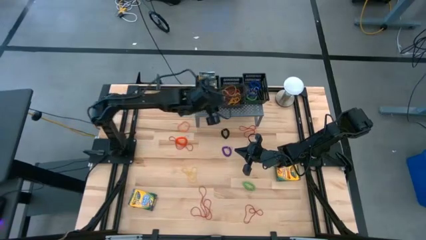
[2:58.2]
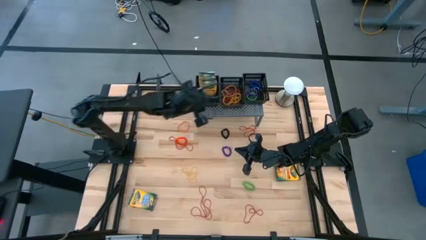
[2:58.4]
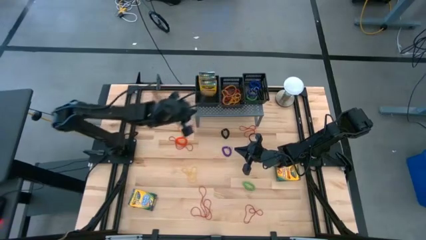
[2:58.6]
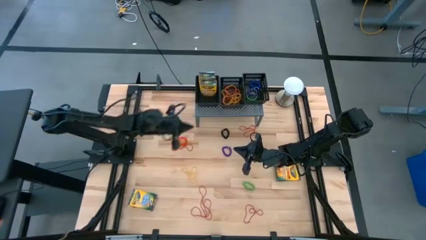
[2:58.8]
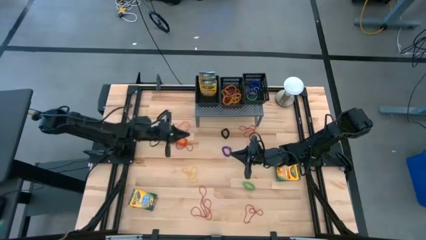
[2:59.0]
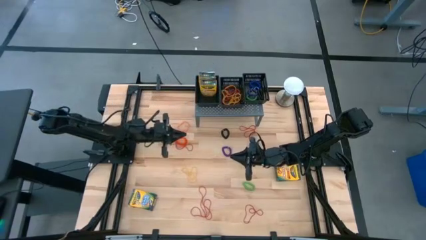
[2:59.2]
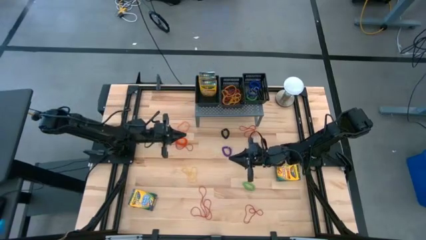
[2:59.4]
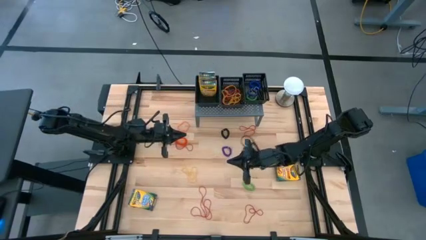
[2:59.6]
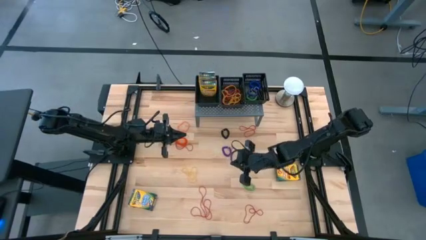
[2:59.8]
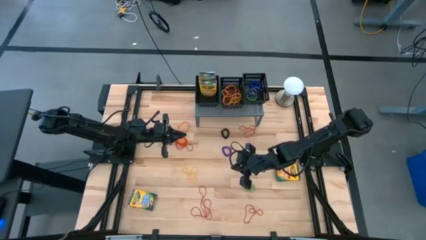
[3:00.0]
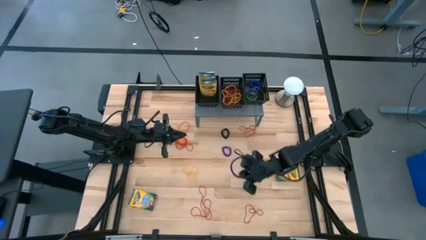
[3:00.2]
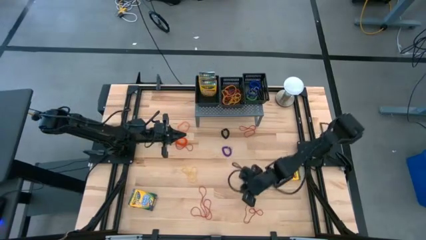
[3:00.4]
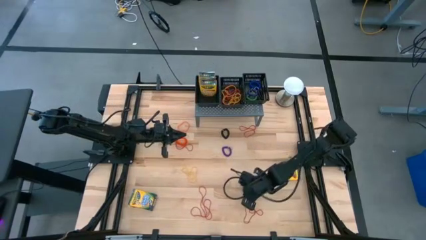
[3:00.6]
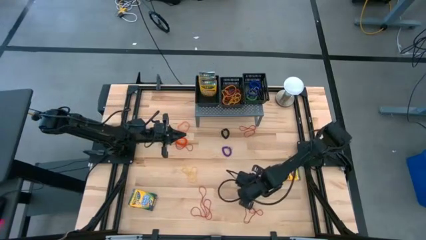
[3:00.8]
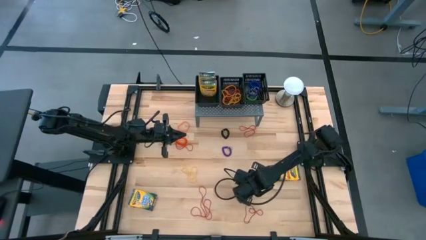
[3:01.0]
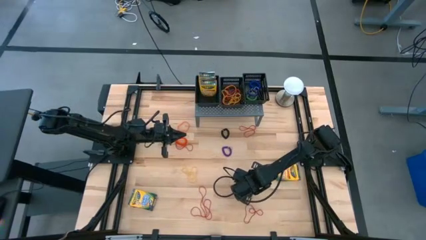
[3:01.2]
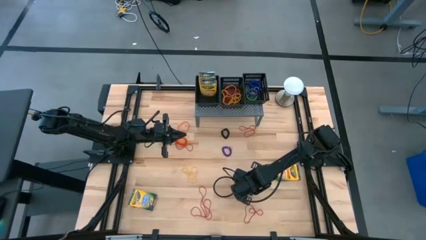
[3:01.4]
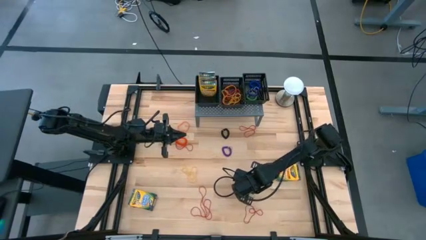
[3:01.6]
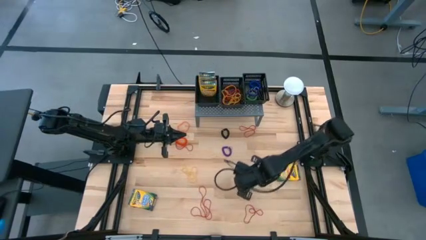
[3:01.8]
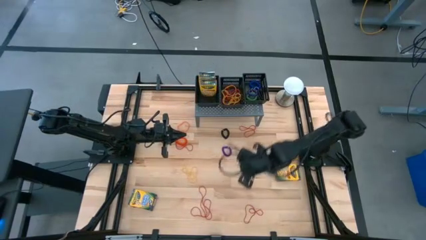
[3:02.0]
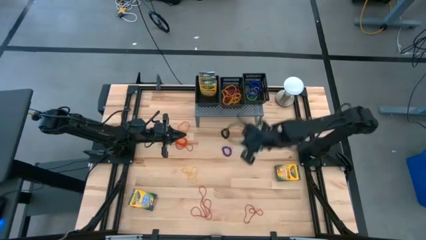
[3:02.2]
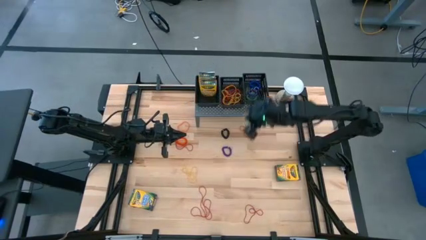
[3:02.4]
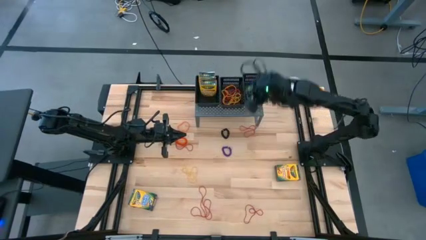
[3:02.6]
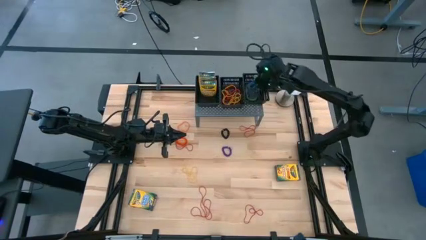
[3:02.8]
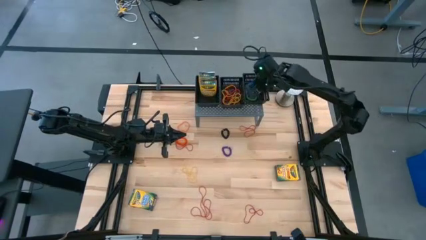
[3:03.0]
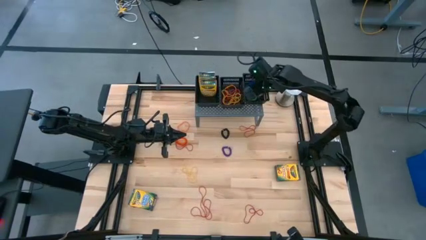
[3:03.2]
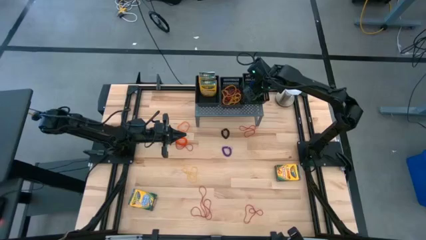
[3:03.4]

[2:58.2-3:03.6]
Task: Sort rubber bands into baskets
Put the green spring rubberband into the right black basket on the shelf

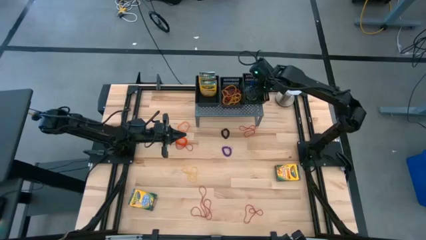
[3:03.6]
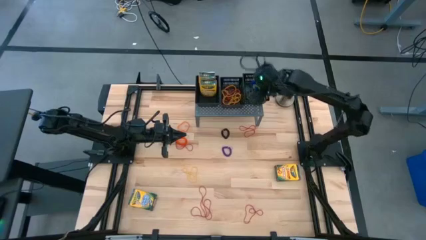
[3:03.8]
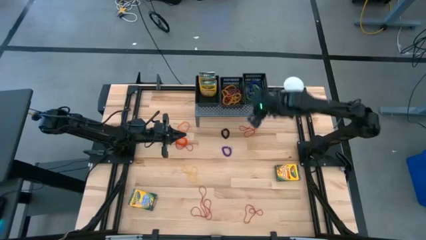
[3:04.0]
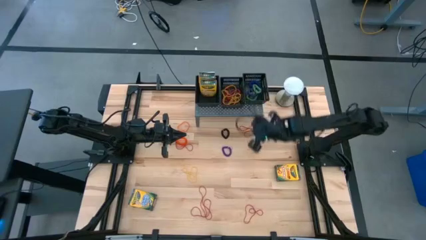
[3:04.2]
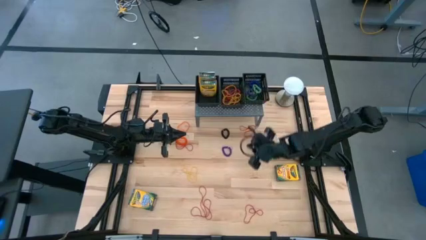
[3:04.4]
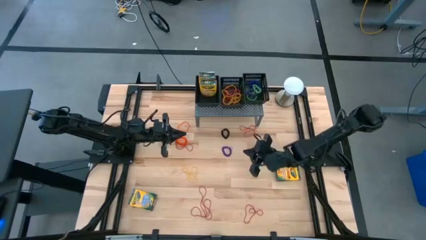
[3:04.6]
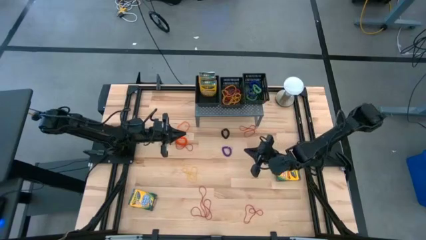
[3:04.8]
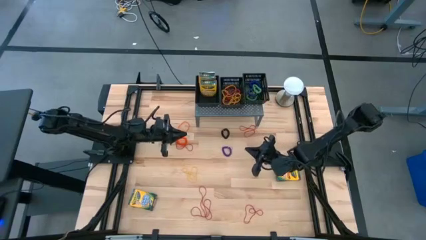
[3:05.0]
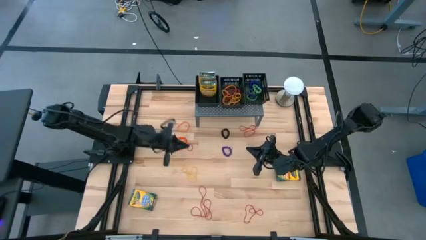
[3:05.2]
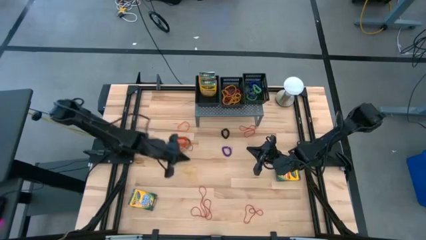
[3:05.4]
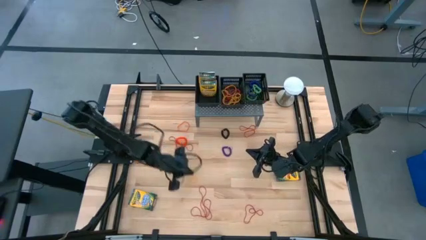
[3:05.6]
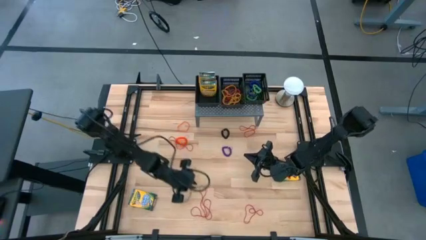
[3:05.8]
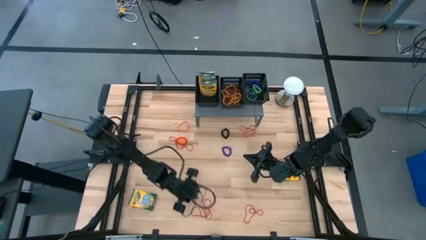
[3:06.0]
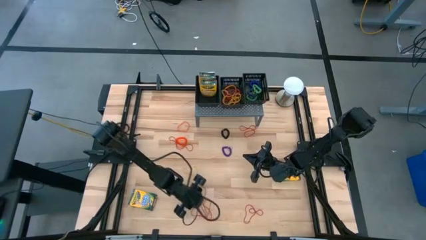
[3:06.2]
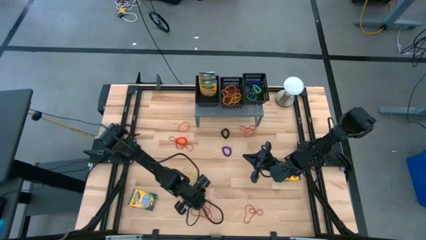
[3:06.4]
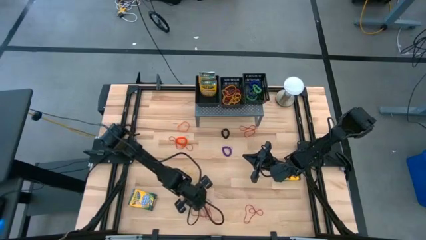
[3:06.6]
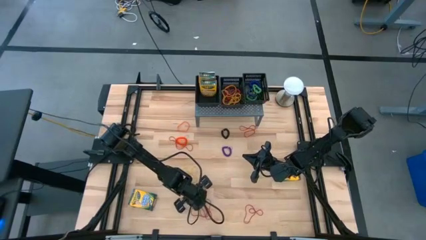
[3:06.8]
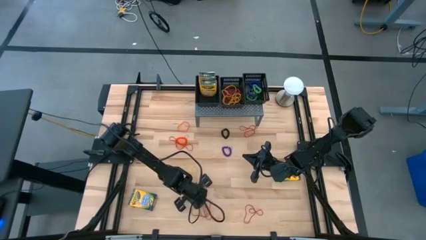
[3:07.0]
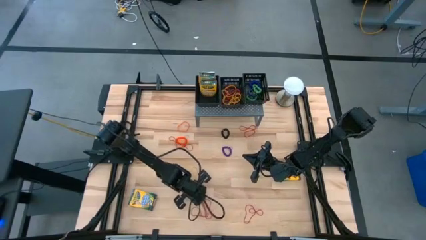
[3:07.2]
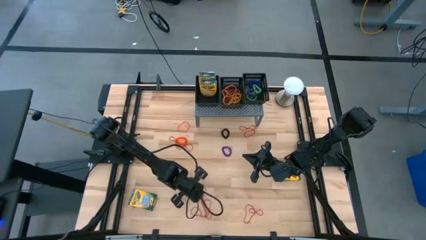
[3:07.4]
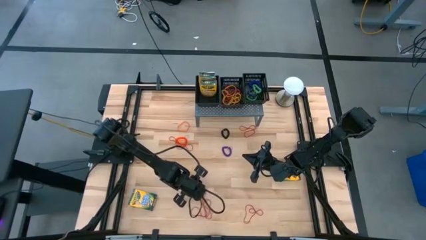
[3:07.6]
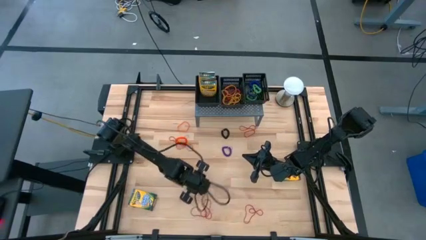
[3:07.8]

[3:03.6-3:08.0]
Put the red rubber band into the middle black basket on the shelf

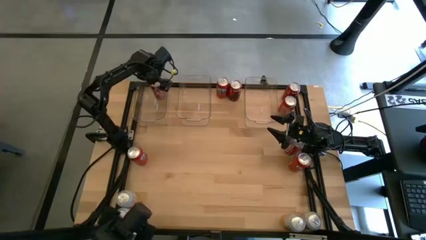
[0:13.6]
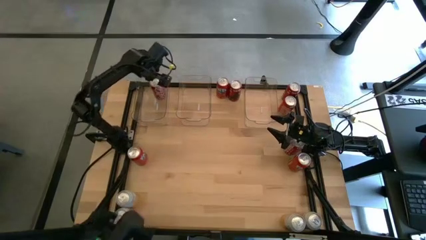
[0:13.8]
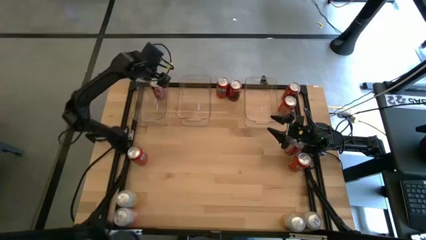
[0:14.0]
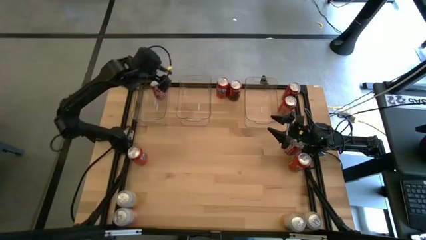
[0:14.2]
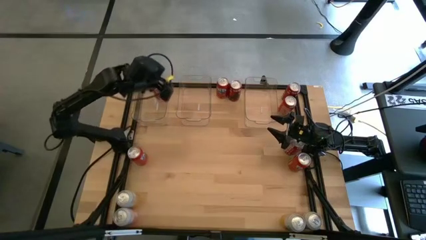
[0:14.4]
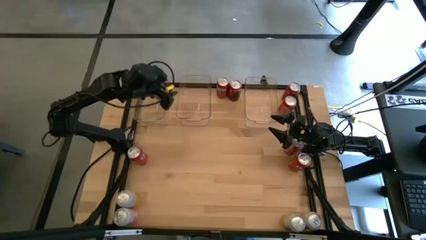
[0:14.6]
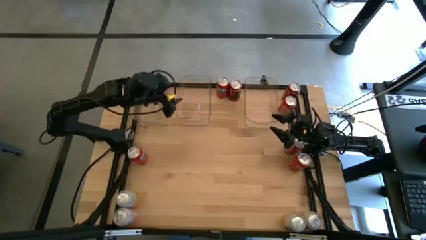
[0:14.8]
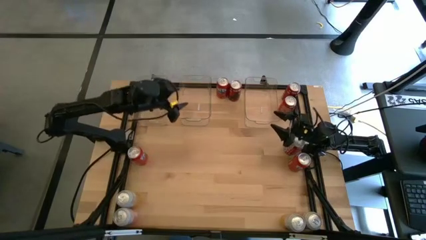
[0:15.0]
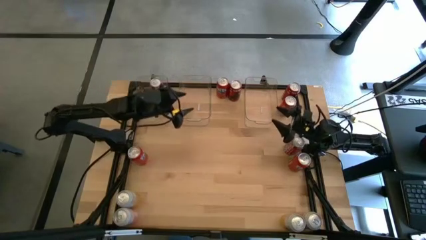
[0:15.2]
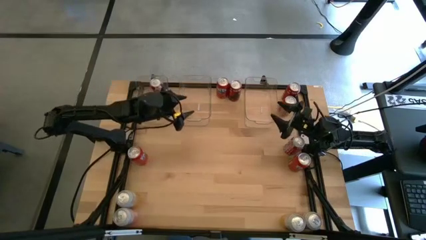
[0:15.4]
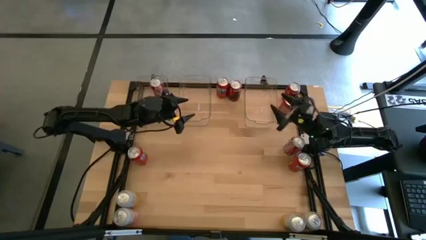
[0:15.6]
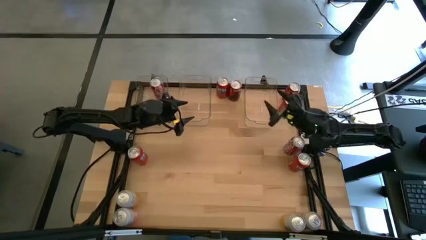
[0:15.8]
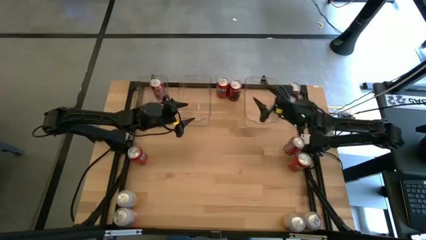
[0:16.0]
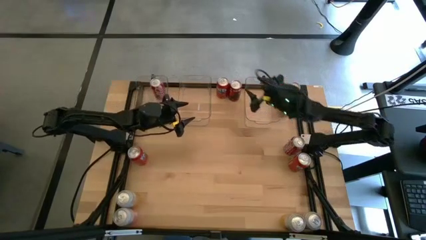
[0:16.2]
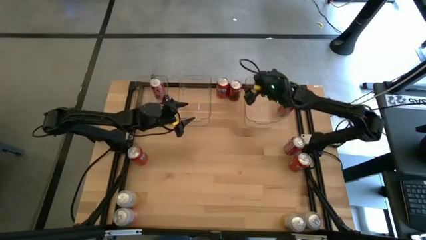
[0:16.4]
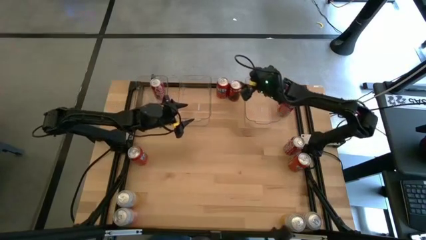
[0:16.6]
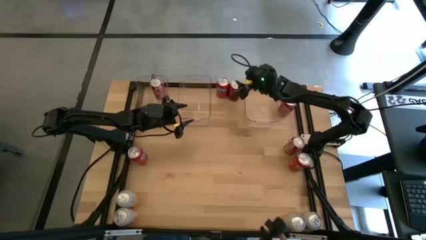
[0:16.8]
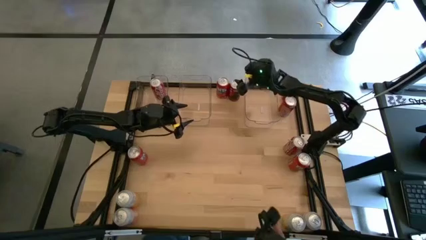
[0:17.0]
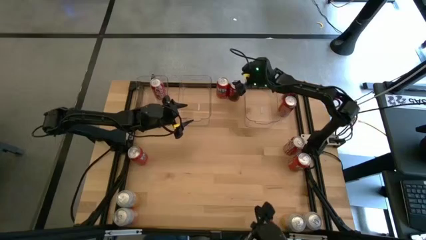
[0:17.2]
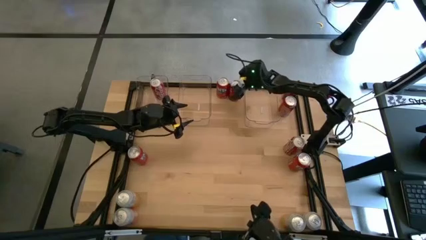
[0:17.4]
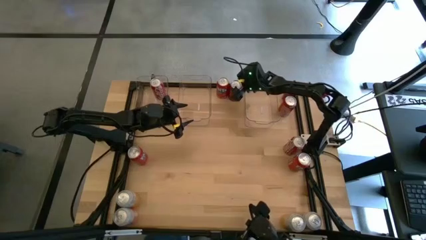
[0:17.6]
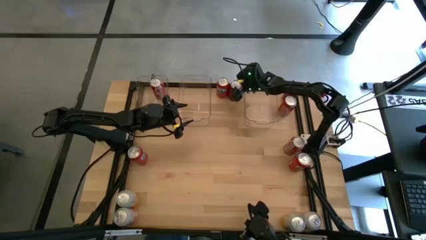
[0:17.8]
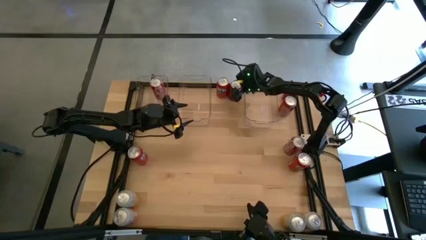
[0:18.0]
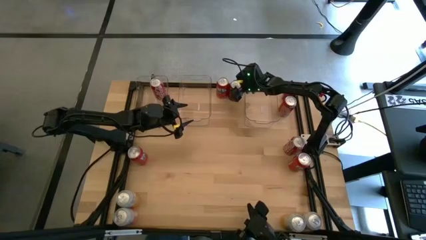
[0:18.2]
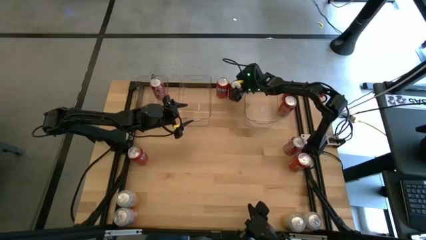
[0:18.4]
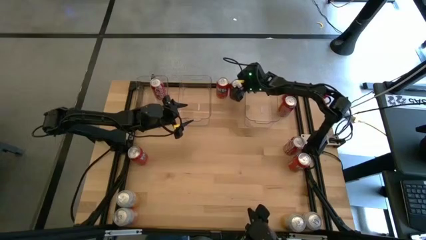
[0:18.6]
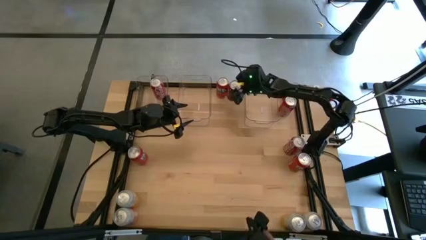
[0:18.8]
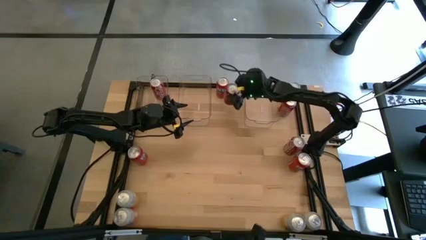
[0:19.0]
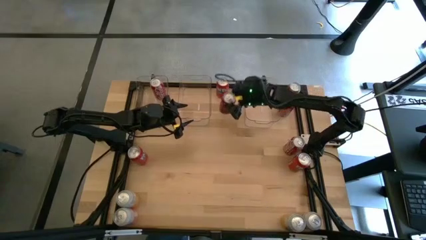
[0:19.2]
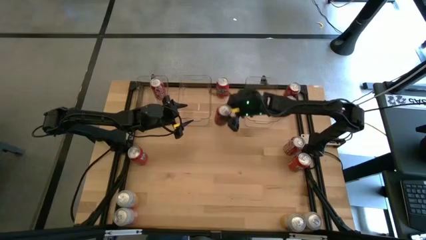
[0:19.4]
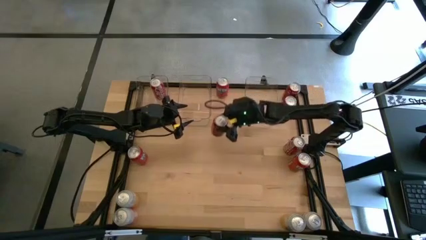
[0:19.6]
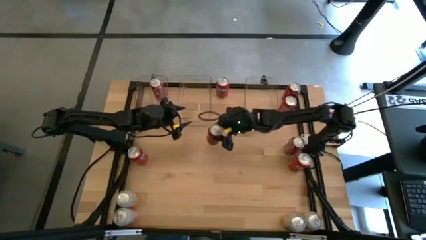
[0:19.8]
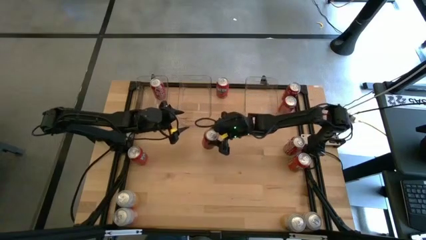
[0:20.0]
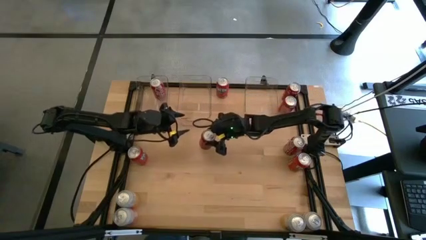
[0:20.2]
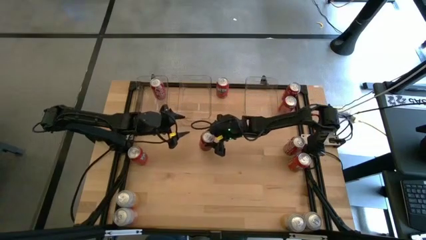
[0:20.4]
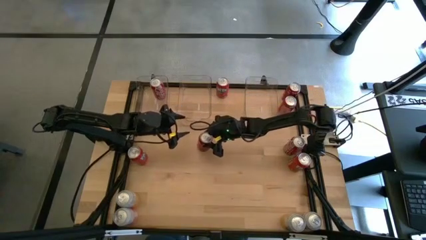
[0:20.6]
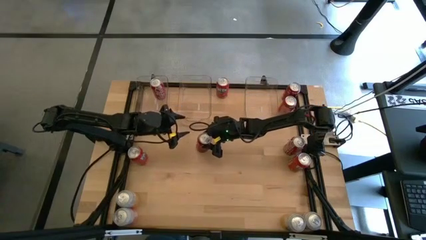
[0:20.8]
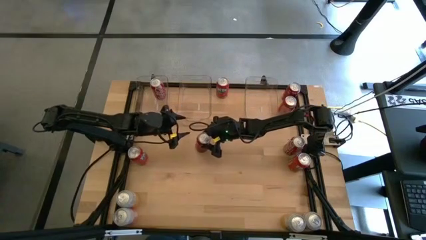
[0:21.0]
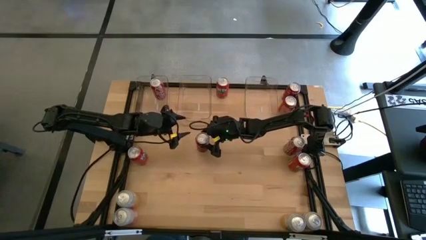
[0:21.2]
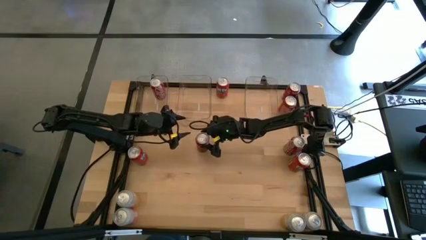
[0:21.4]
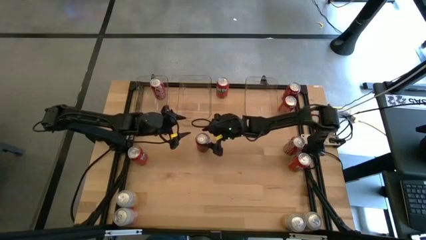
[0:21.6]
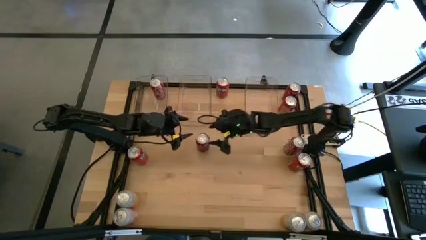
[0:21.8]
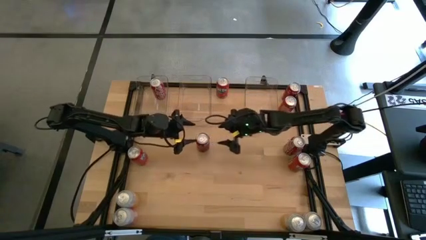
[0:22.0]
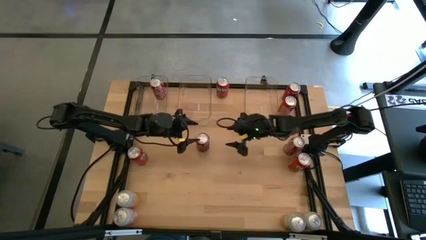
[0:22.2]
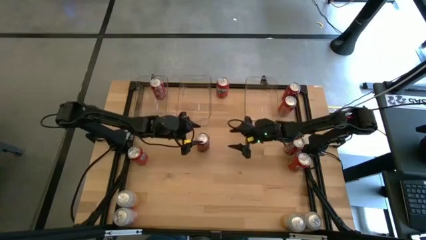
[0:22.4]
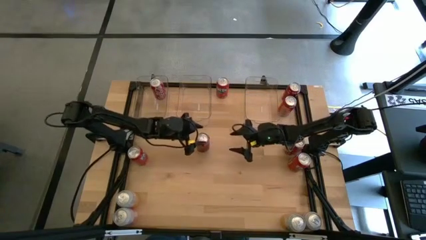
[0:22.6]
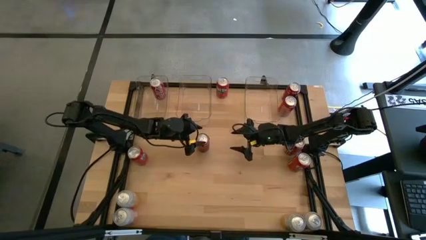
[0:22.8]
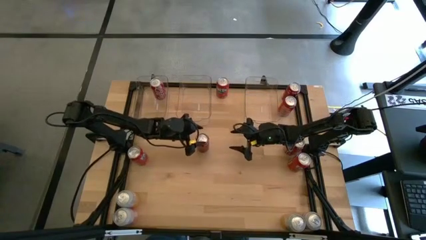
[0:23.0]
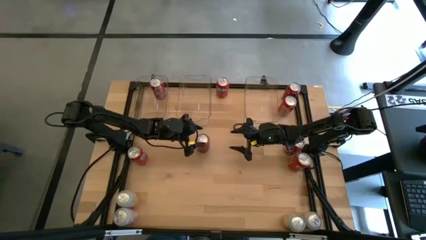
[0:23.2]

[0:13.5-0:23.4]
Task: Sort soda cans
Put the red soda can into the left transparent bin
